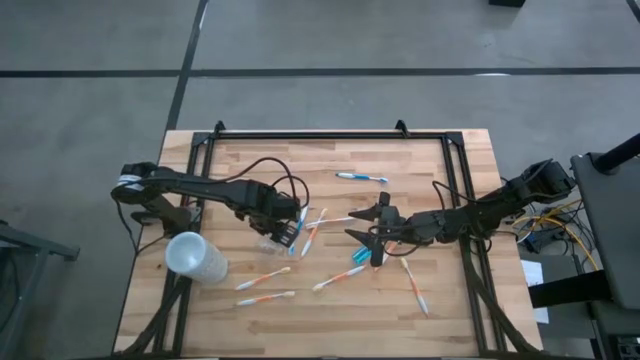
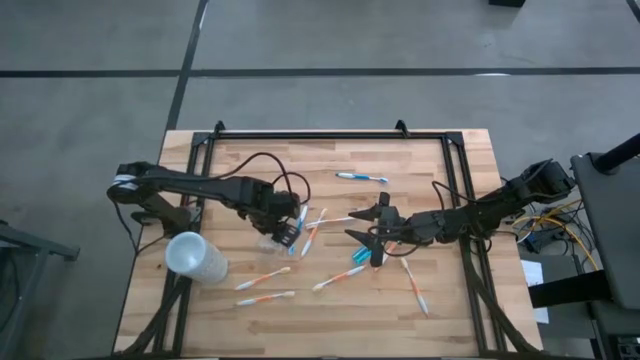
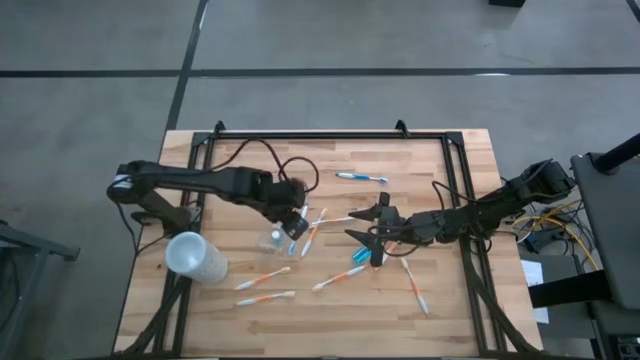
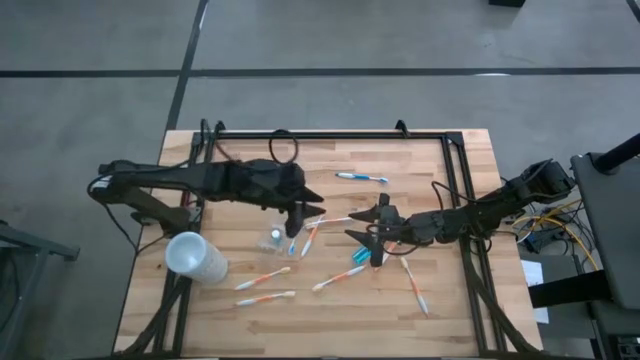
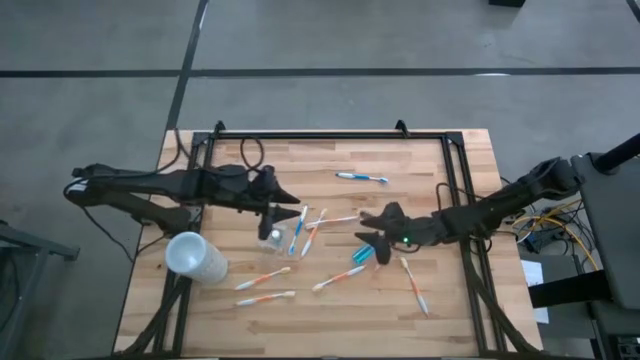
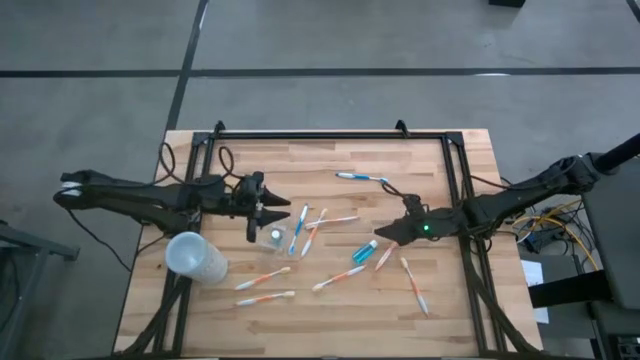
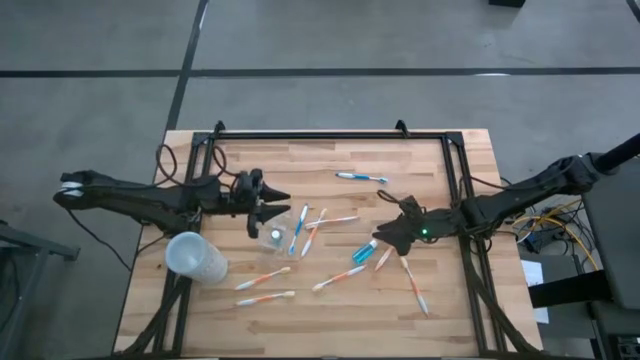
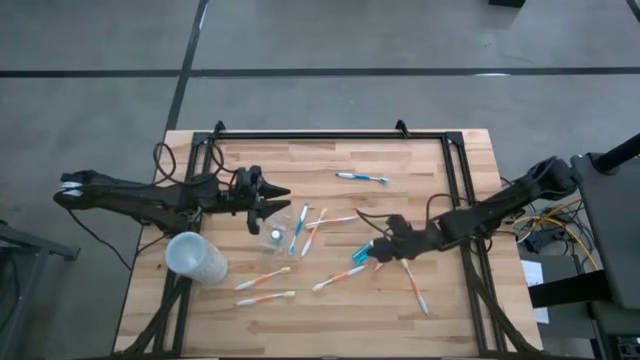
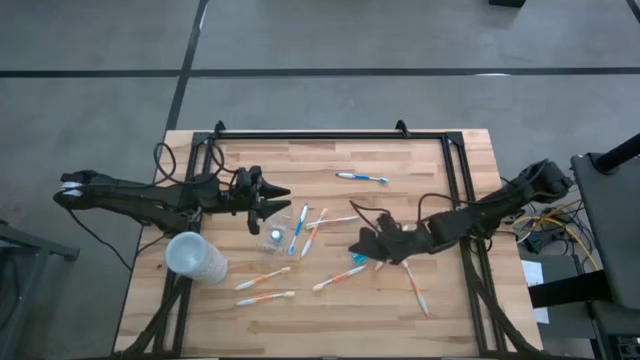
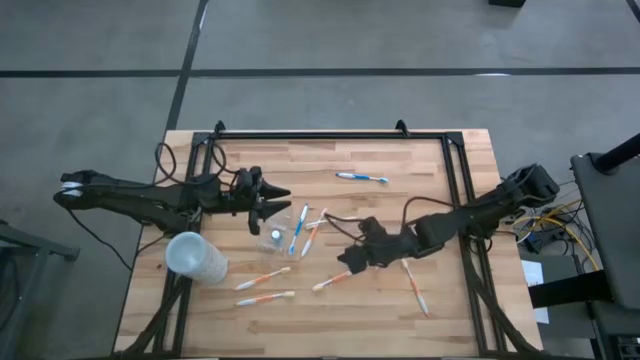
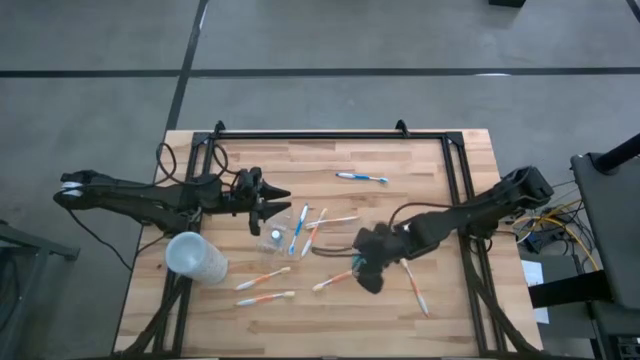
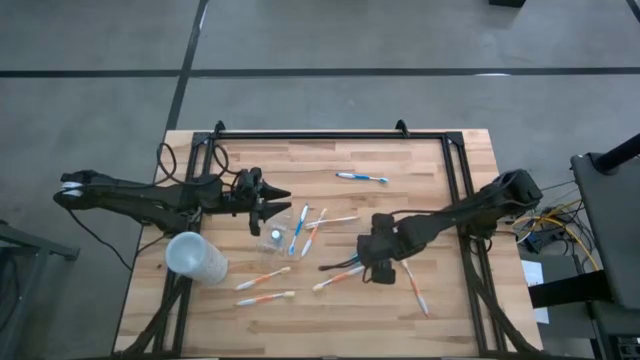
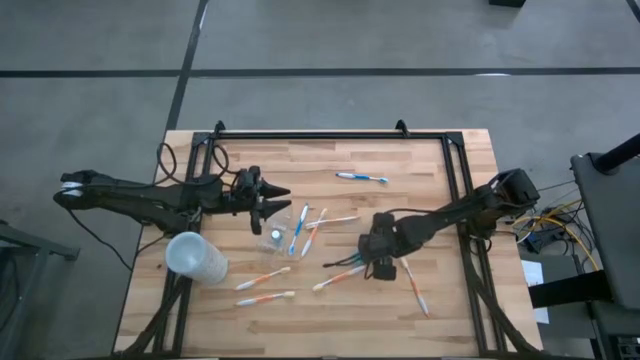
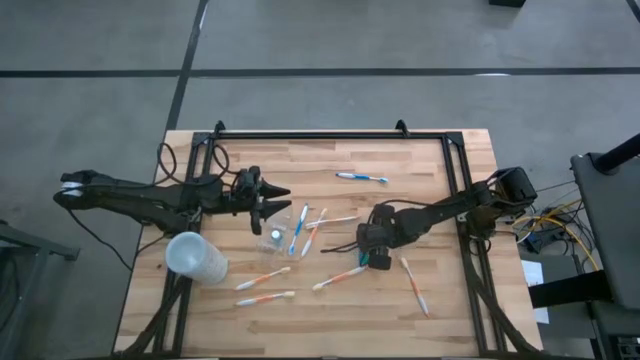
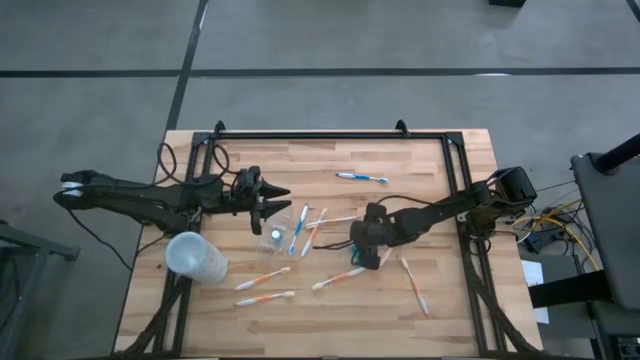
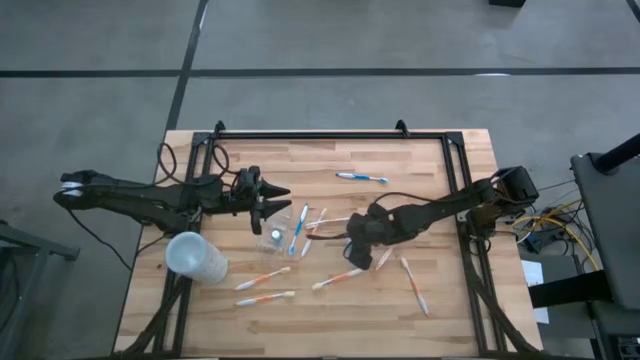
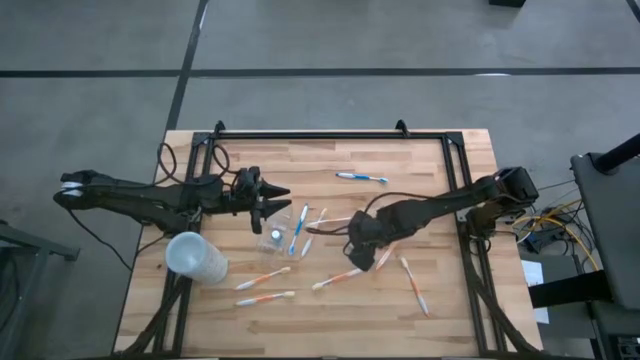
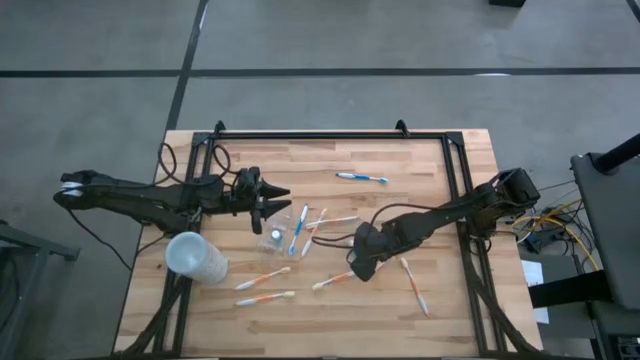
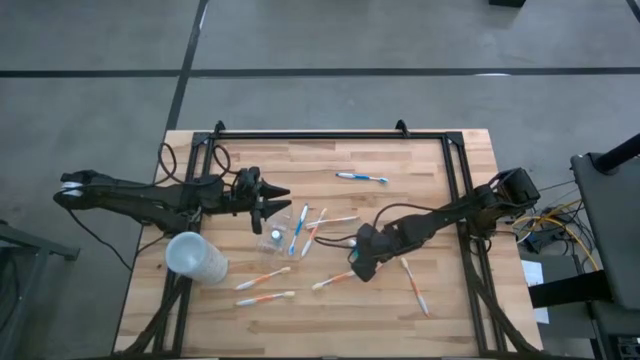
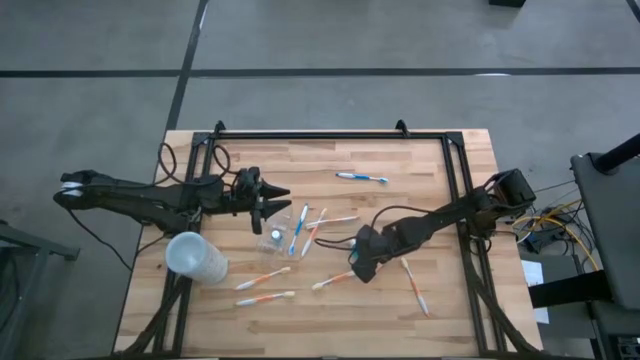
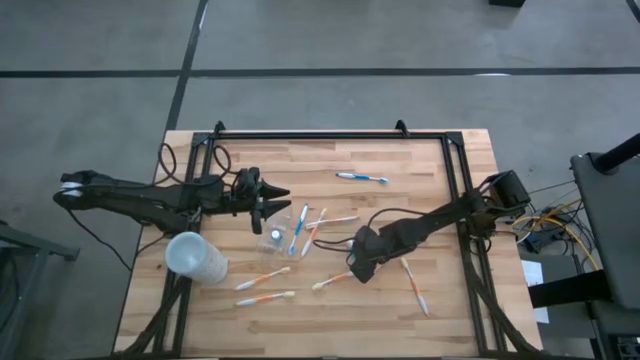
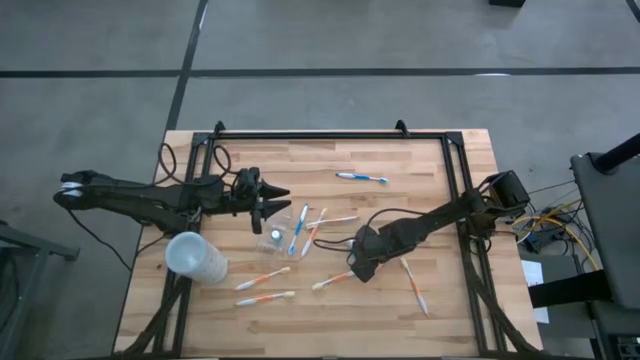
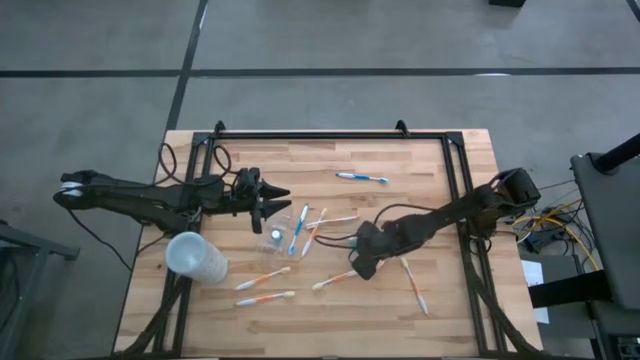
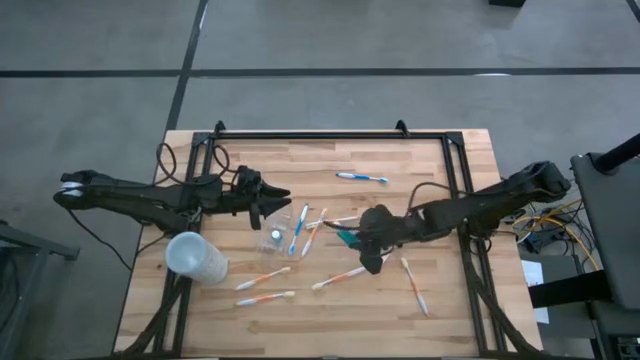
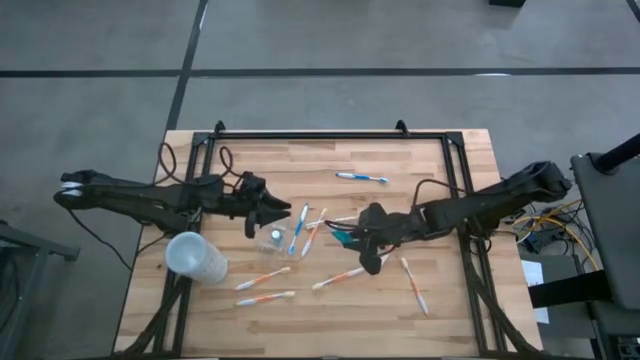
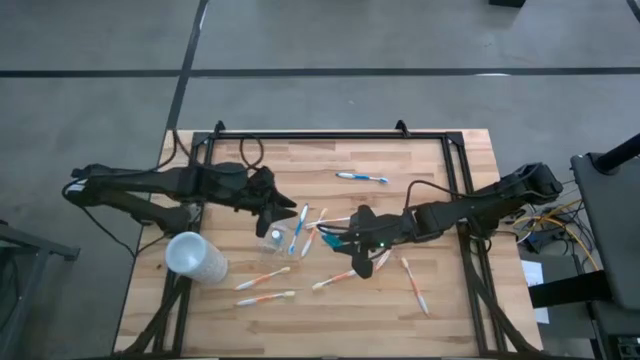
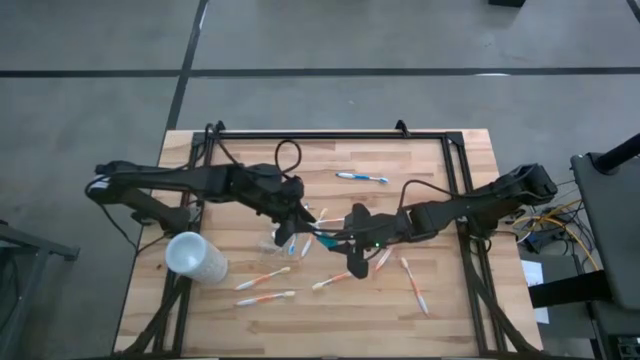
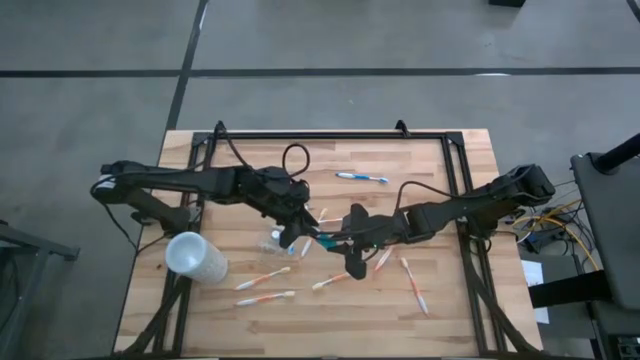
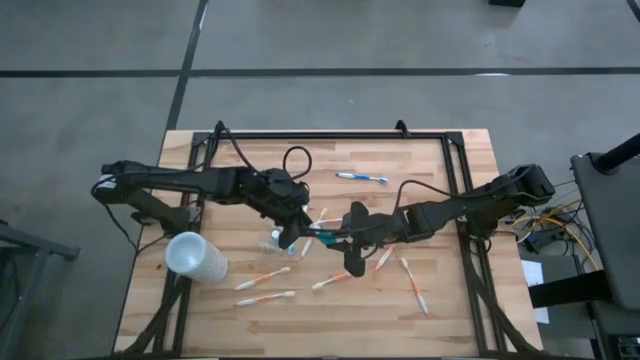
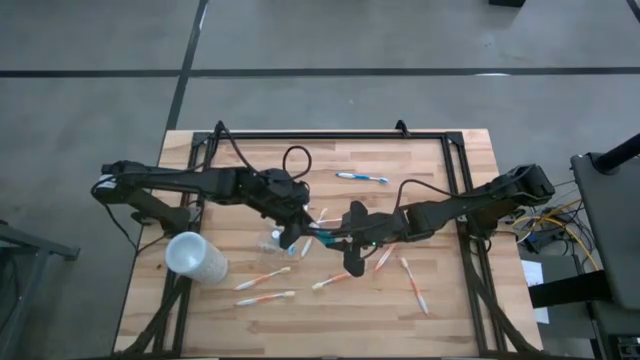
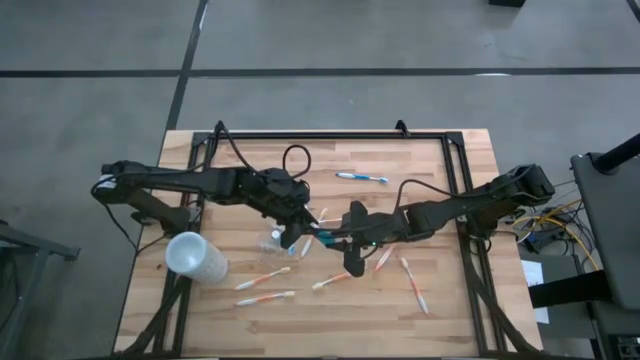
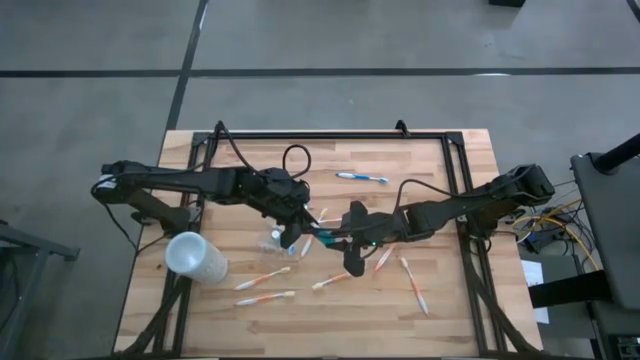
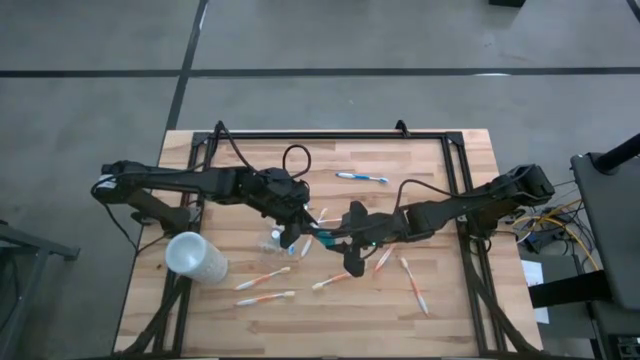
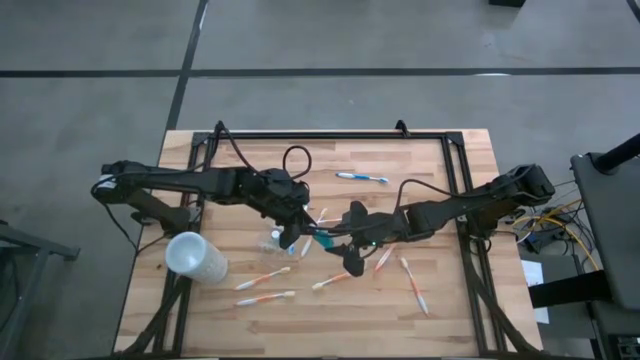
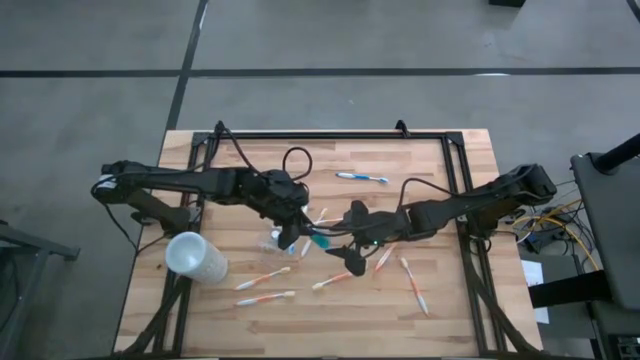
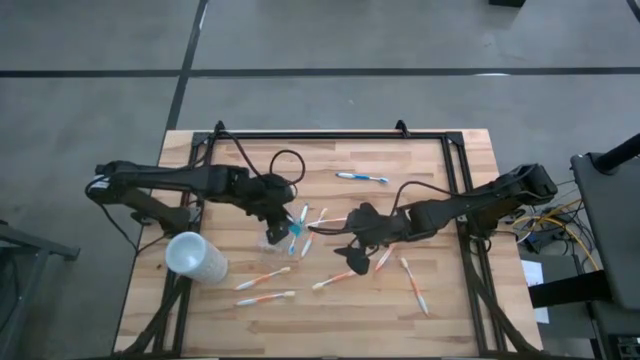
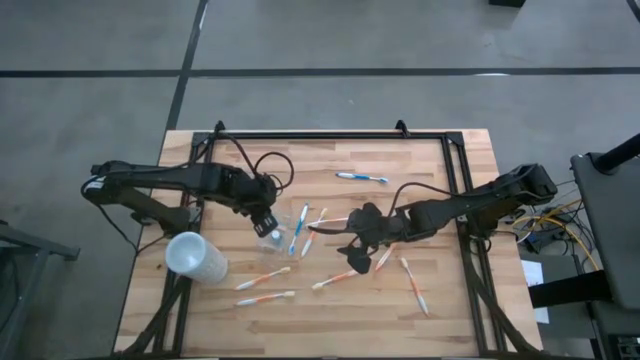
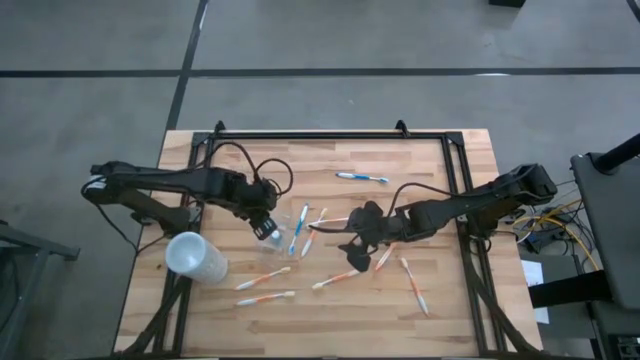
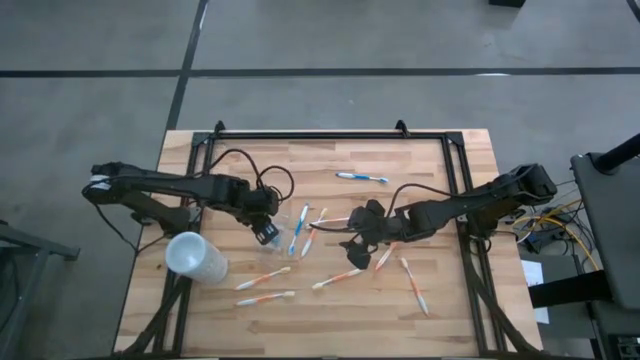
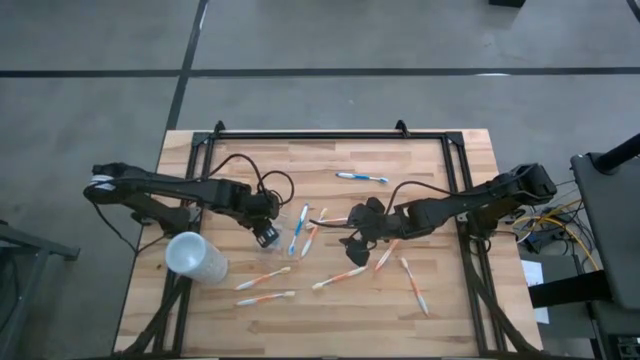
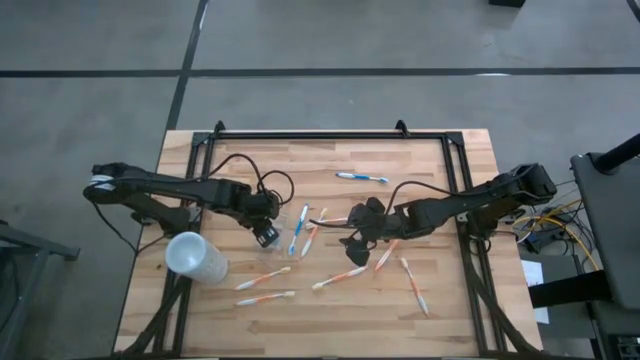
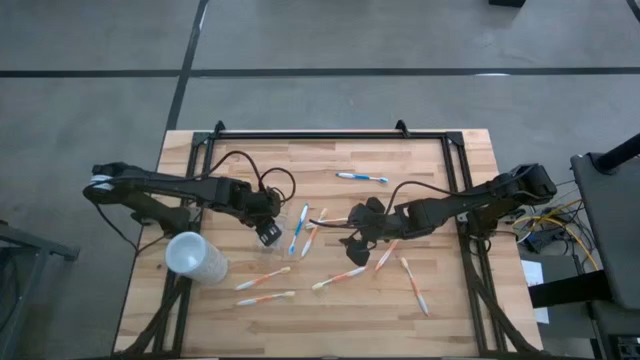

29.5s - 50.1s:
Task: Pick & Place toothbrushing station
Put the mouthwash bottle into the transparent organizer
